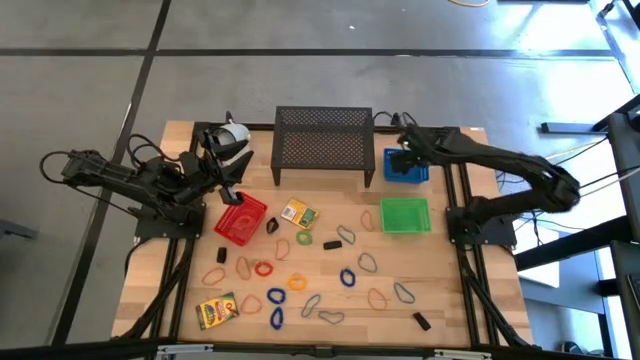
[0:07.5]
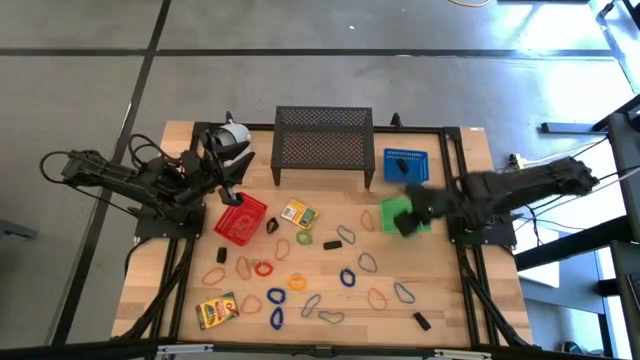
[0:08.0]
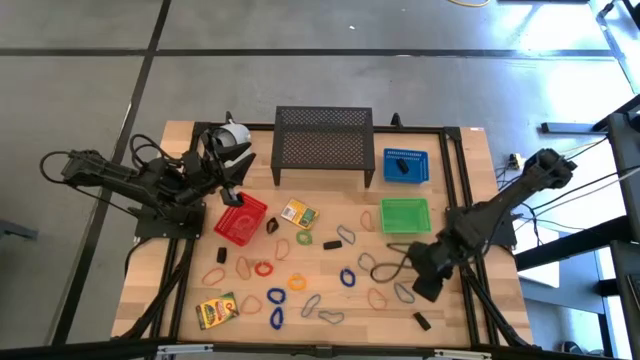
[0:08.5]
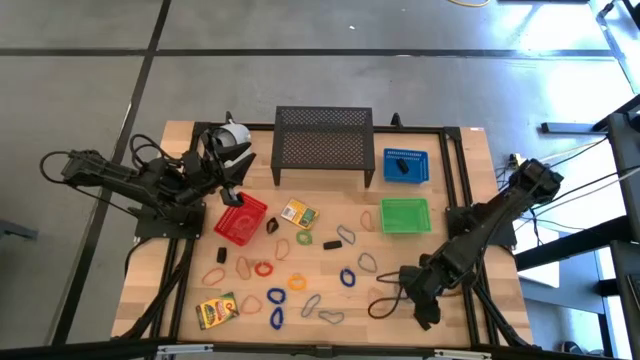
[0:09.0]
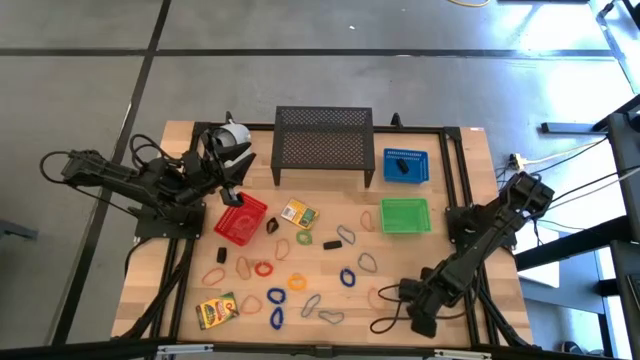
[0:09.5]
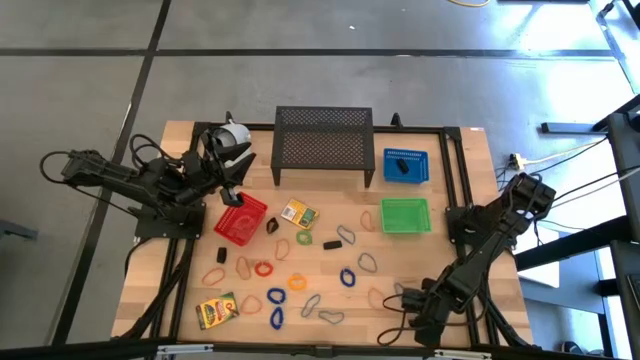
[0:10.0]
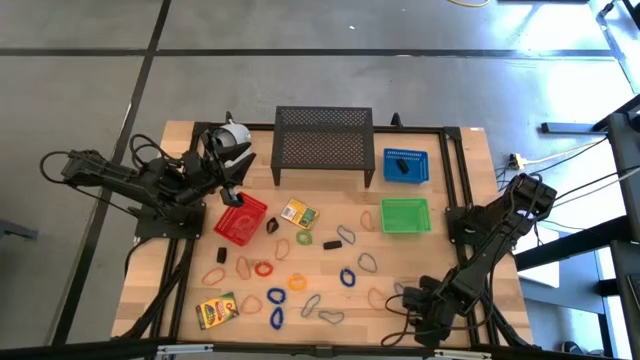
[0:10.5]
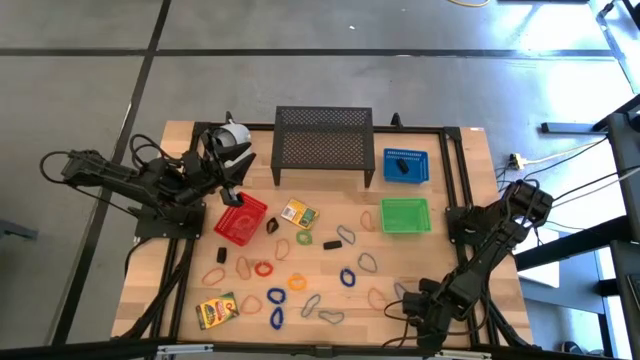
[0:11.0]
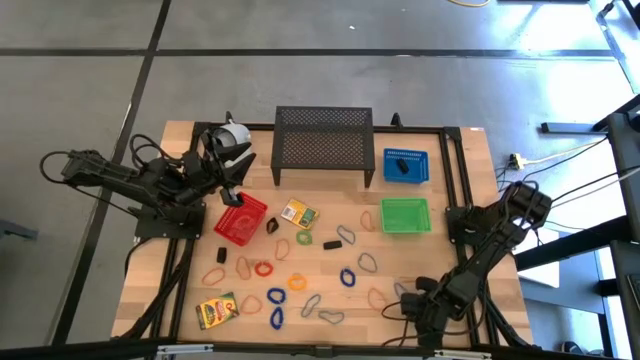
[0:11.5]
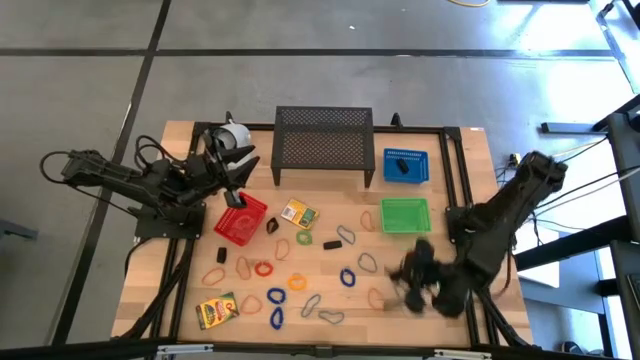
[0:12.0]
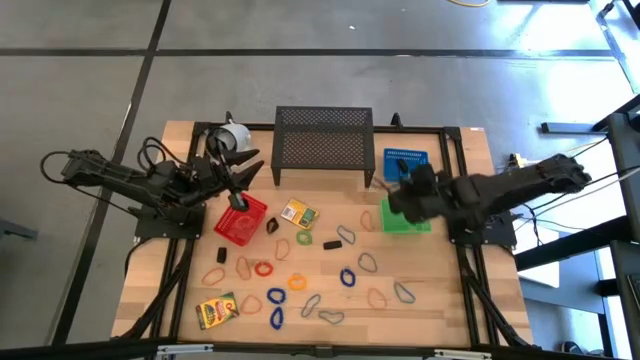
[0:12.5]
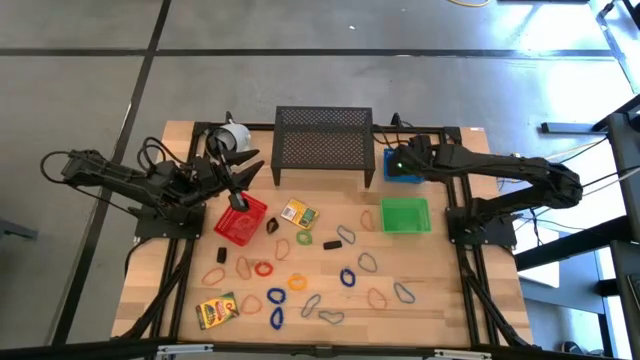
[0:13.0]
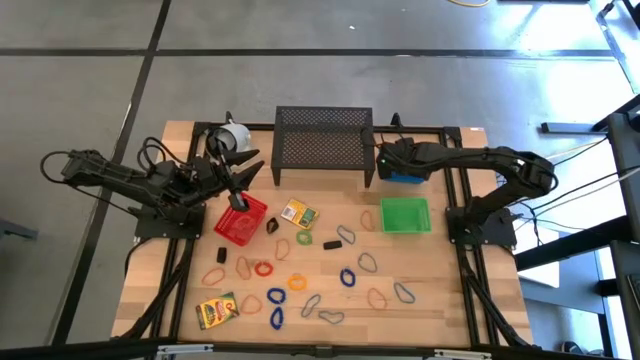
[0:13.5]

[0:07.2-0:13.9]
Task: Pick & Place Office Desk Supplies
Put the black rubber band into the blue bin

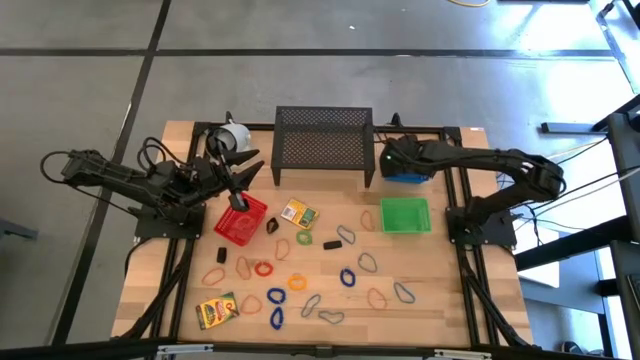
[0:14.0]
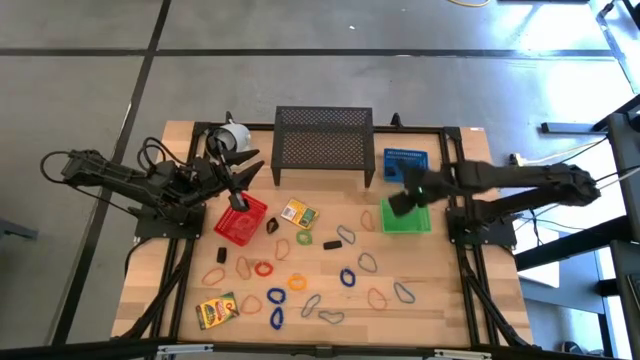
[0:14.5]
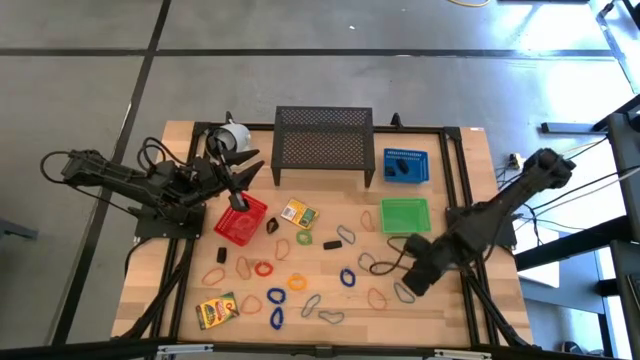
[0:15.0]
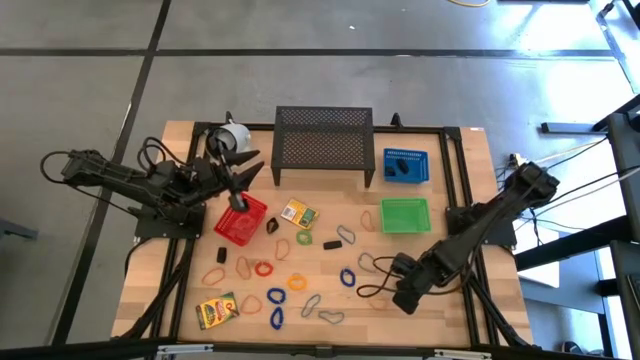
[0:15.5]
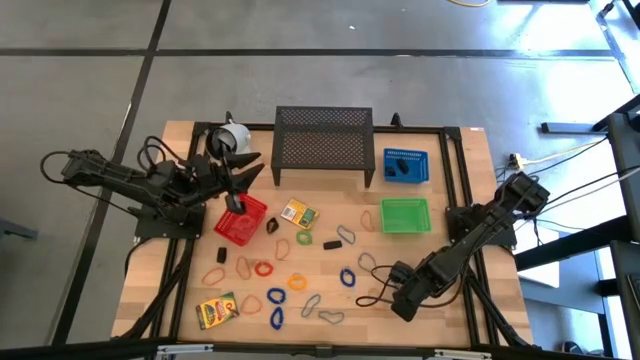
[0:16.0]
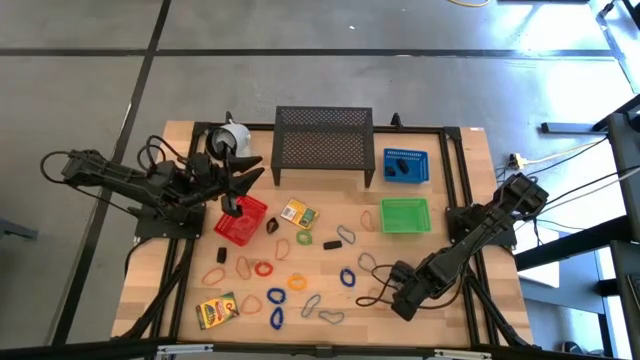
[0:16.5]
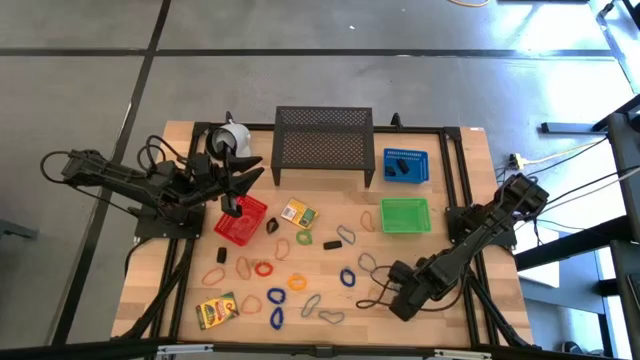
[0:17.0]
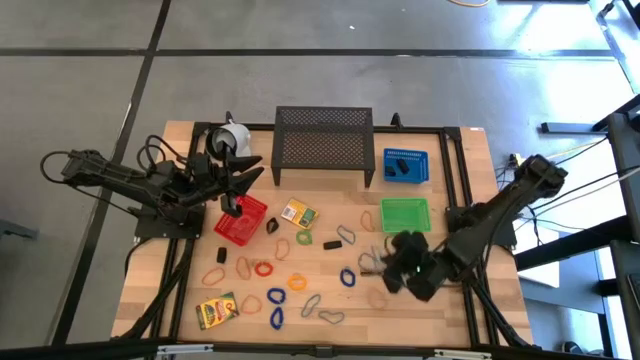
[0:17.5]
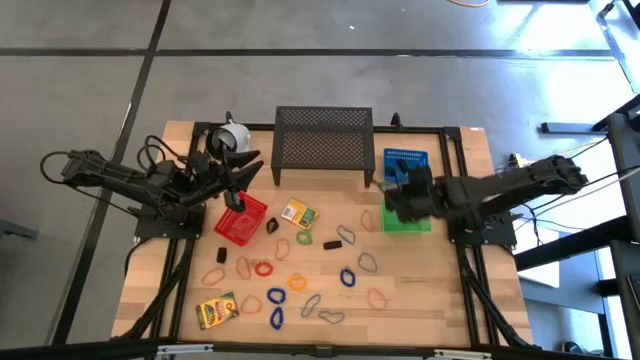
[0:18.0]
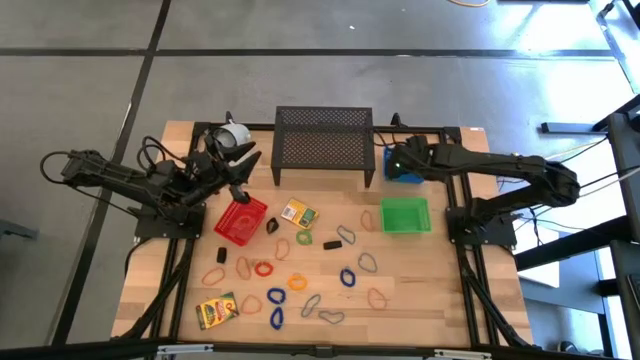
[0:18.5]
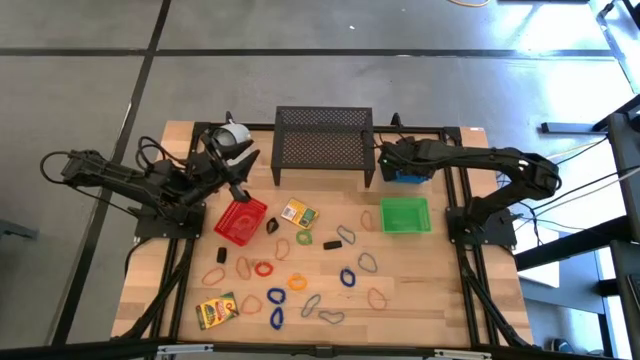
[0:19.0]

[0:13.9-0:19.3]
Put the blue rubber band into the blue bin

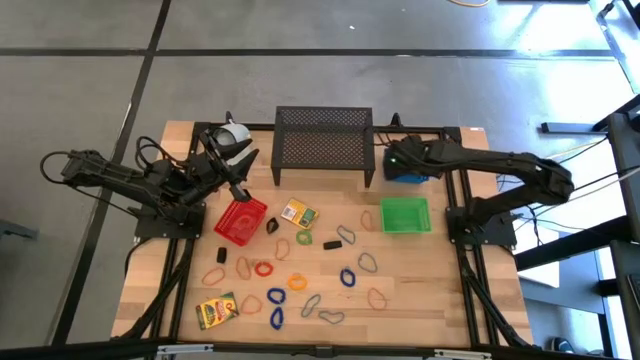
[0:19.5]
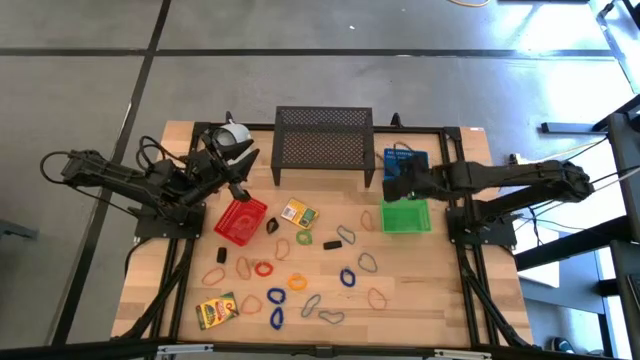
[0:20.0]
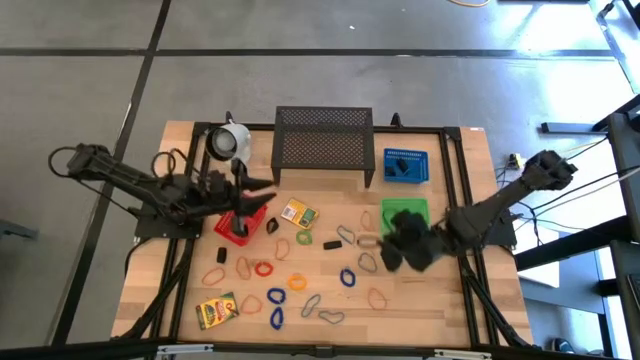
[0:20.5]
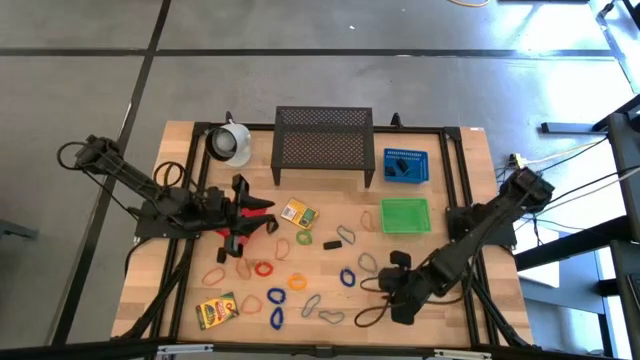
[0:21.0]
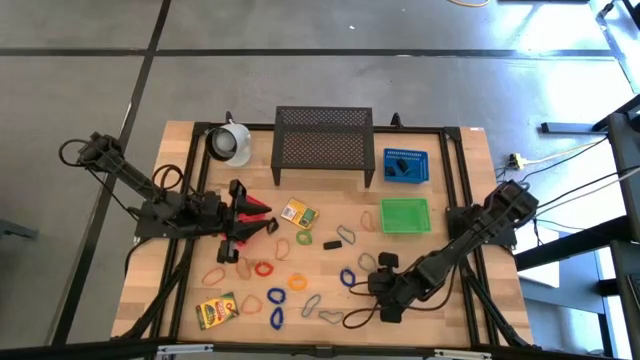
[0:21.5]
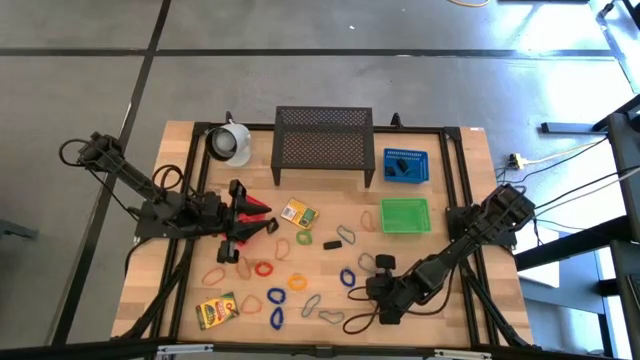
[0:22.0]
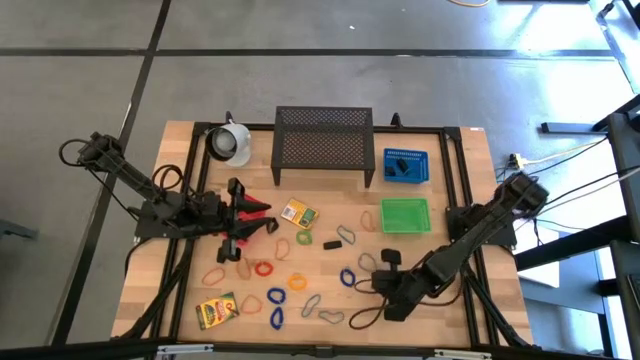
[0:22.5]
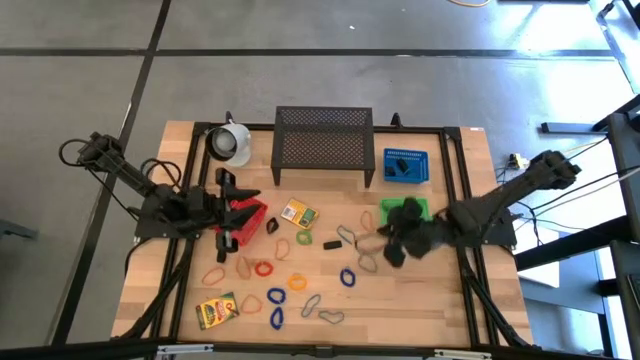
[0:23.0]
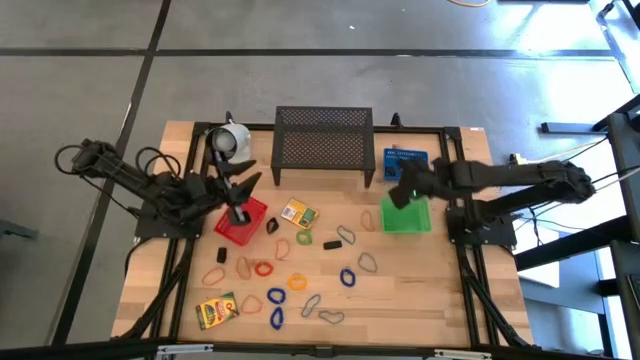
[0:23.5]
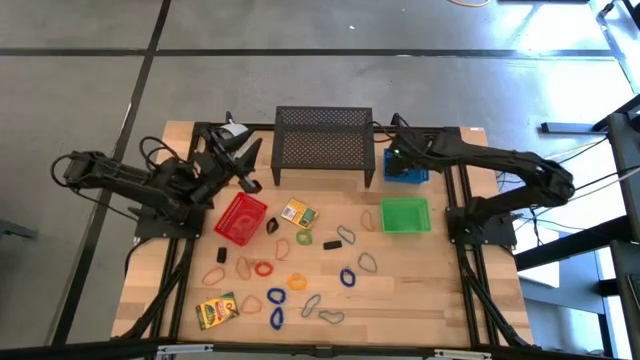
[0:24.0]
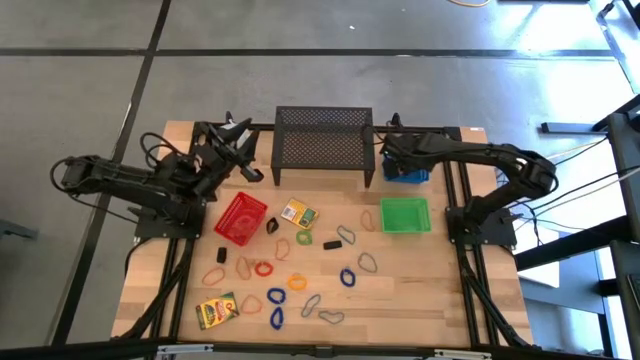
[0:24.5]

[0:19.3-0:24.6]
Put the orange rubber band into the blue bin

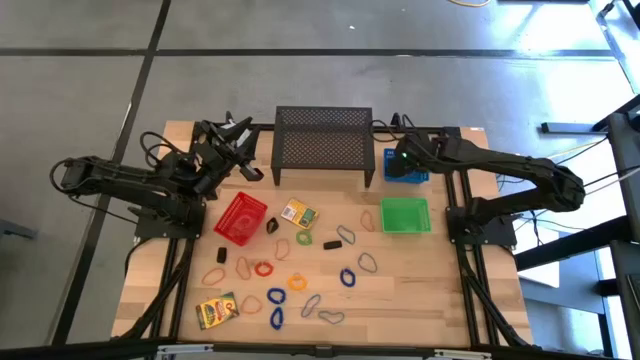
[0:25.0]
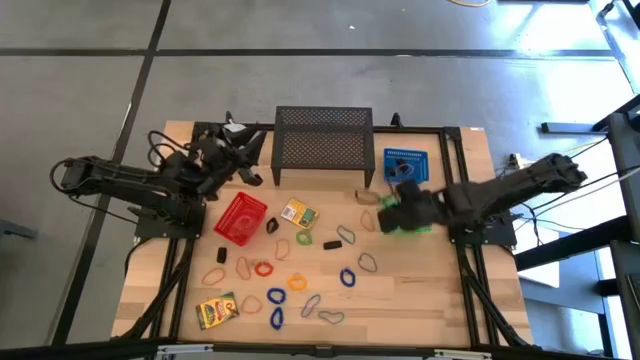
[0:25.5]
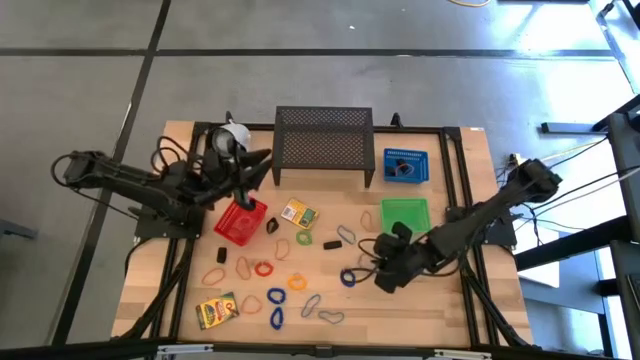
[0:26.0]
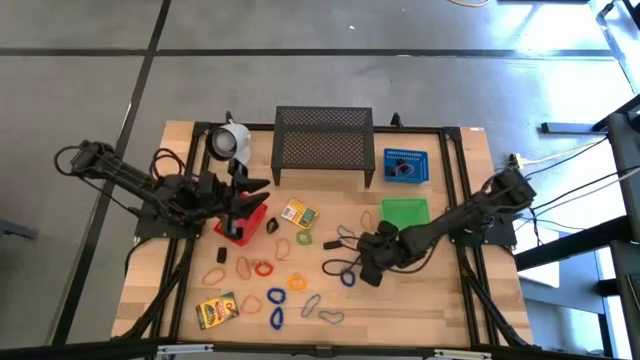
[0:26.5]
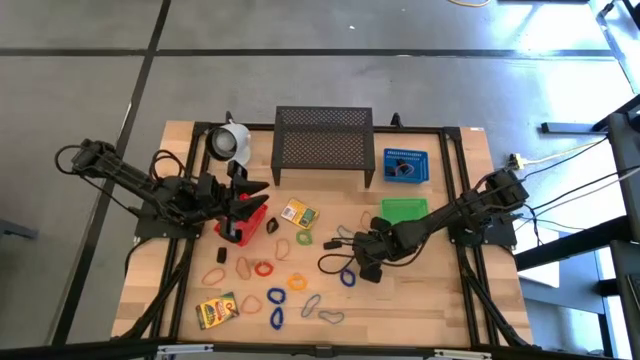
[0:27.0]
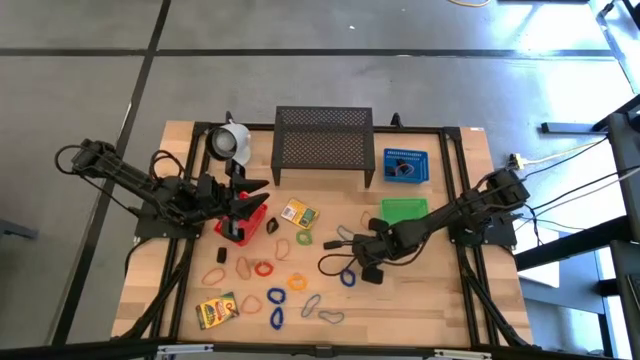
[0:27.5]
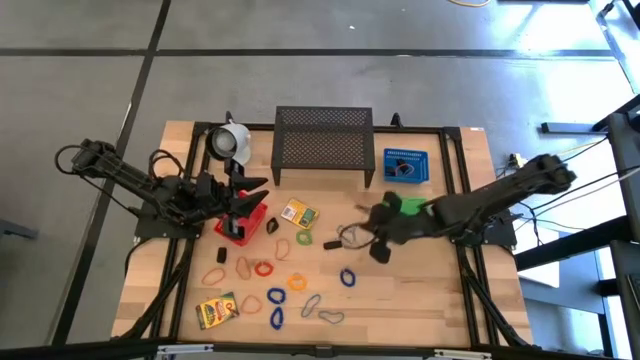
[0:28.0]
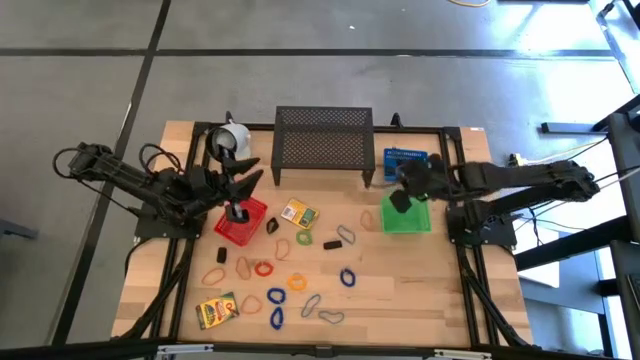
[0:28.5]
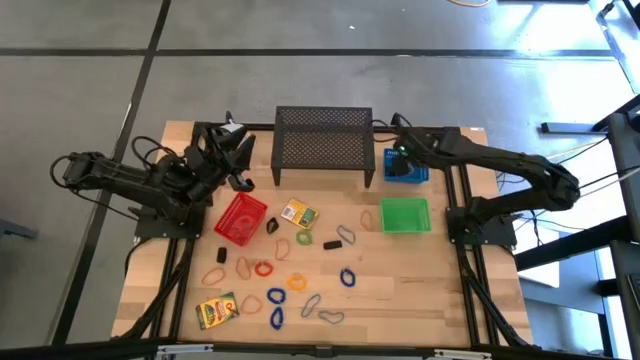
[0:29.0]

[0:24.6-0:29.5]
Put the blue rubber band into the blue bin
